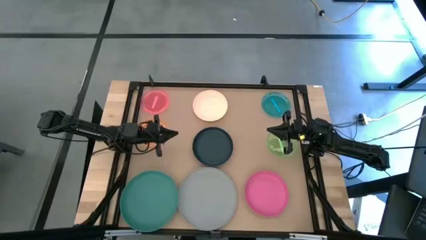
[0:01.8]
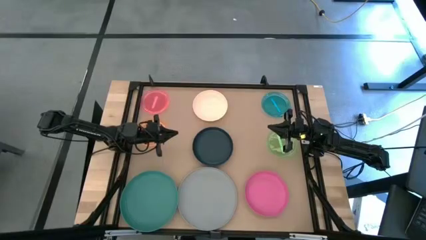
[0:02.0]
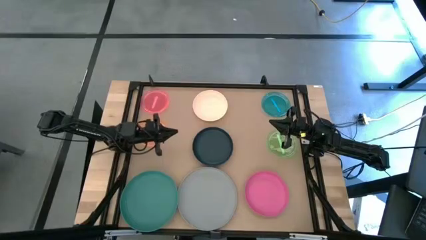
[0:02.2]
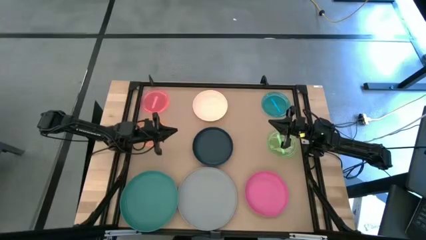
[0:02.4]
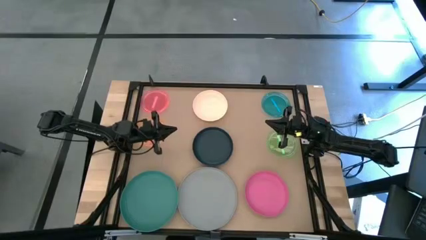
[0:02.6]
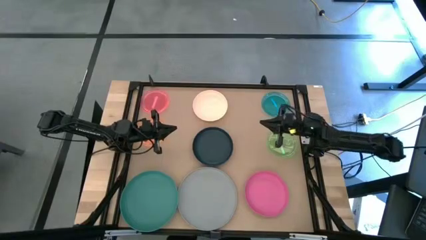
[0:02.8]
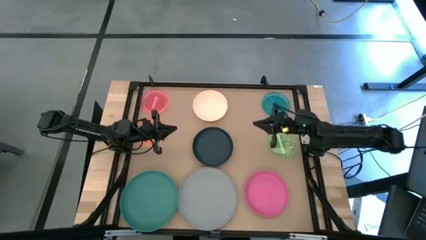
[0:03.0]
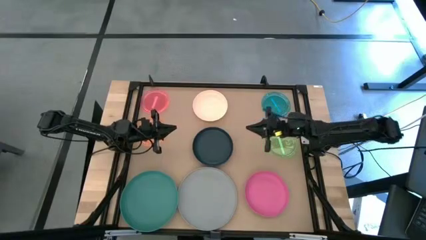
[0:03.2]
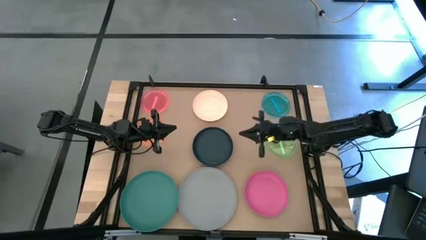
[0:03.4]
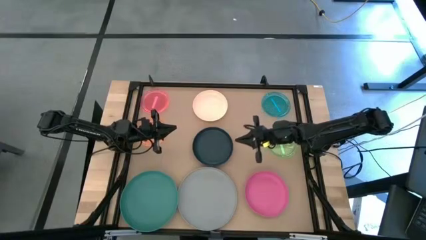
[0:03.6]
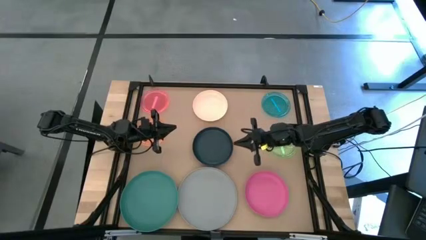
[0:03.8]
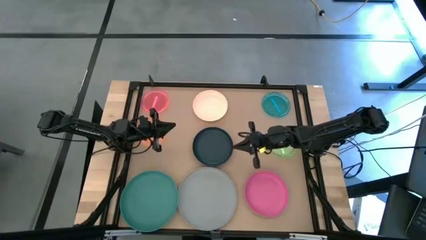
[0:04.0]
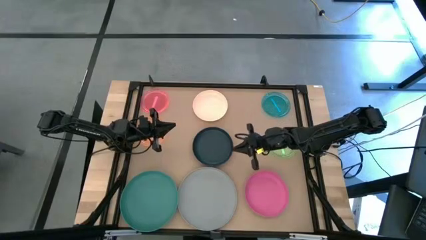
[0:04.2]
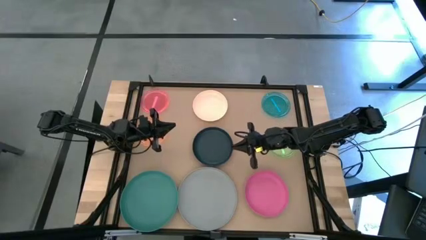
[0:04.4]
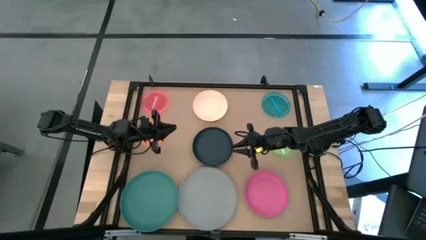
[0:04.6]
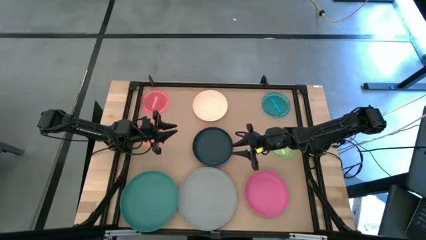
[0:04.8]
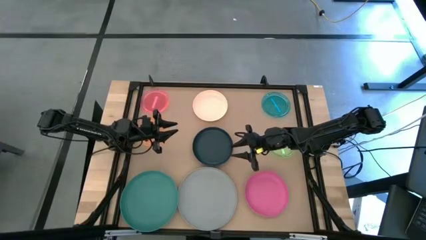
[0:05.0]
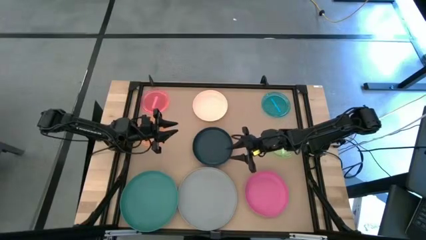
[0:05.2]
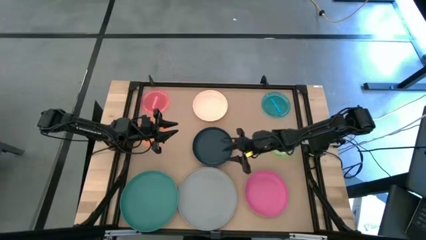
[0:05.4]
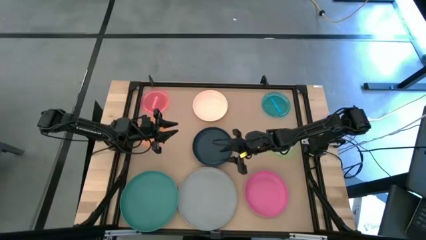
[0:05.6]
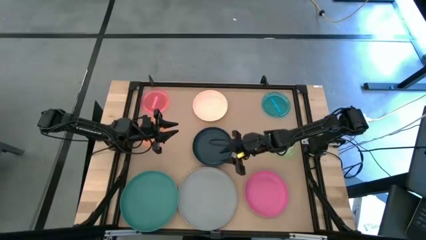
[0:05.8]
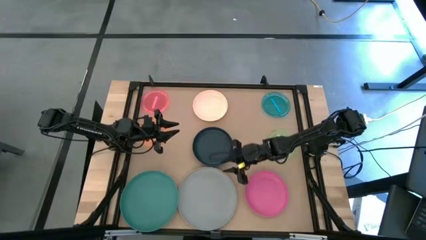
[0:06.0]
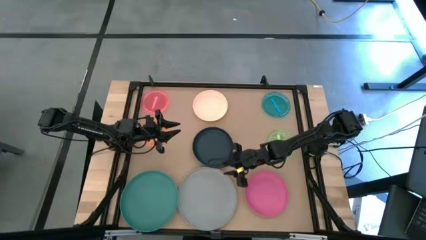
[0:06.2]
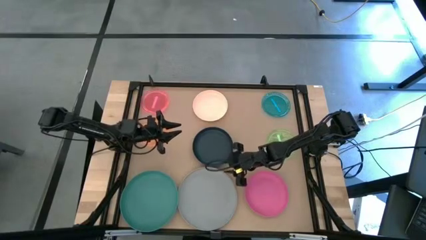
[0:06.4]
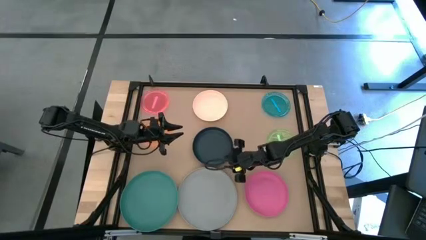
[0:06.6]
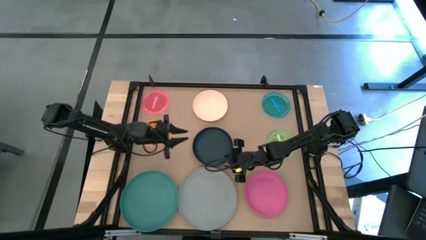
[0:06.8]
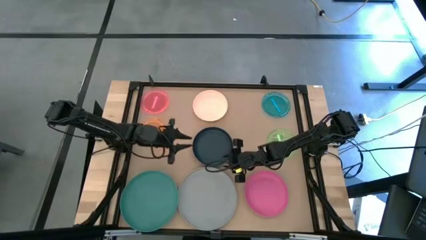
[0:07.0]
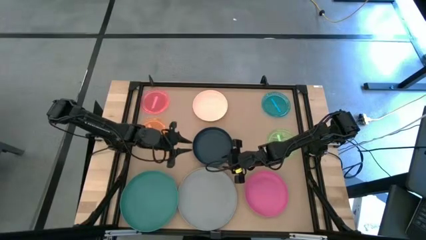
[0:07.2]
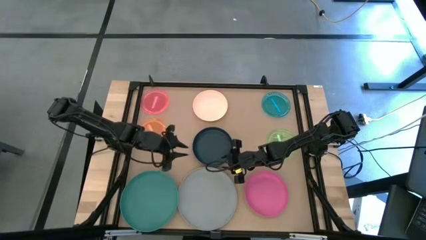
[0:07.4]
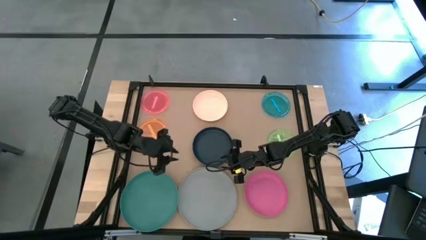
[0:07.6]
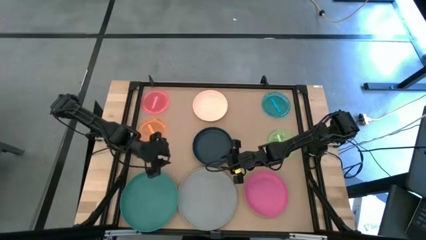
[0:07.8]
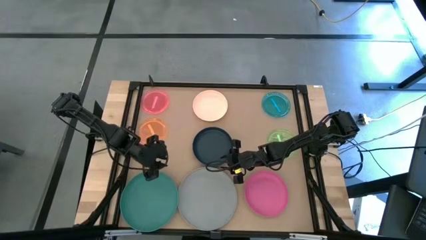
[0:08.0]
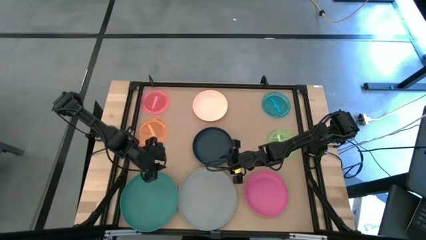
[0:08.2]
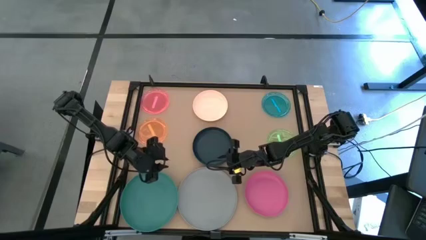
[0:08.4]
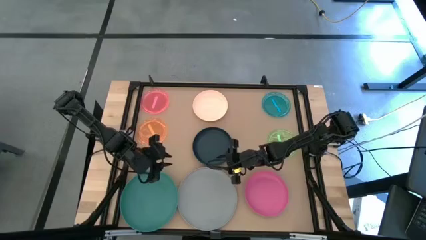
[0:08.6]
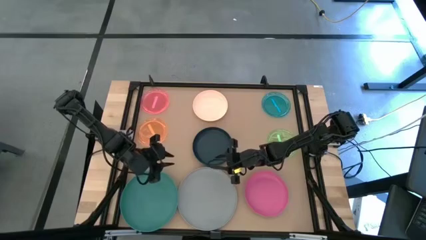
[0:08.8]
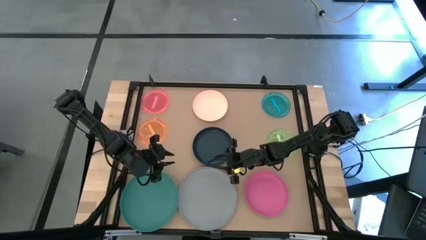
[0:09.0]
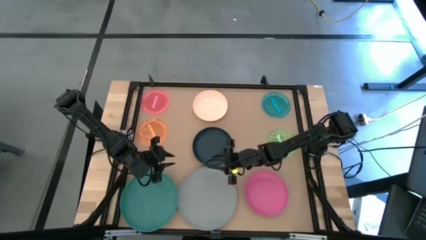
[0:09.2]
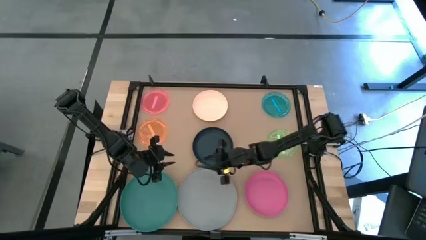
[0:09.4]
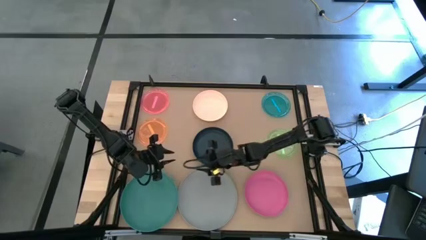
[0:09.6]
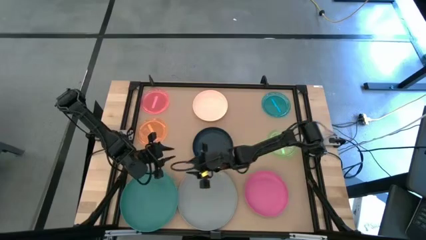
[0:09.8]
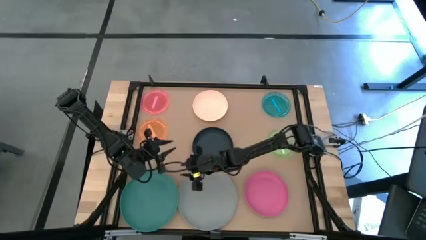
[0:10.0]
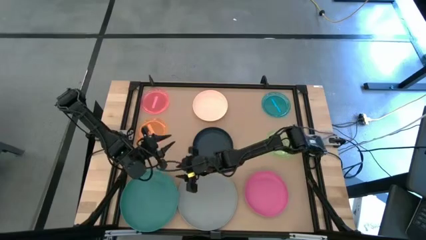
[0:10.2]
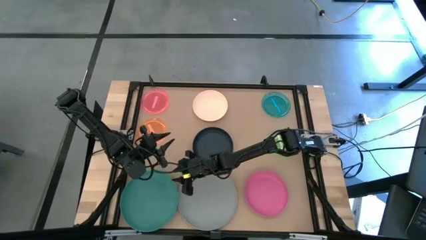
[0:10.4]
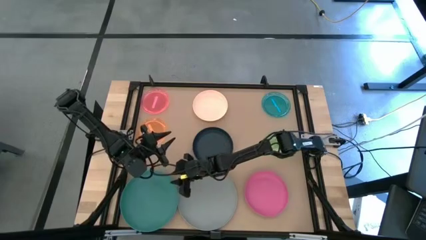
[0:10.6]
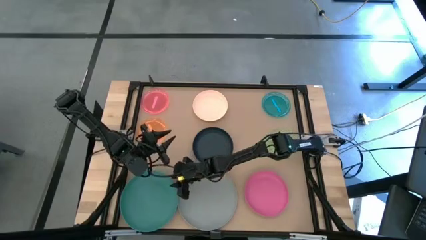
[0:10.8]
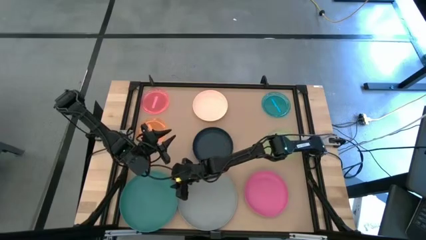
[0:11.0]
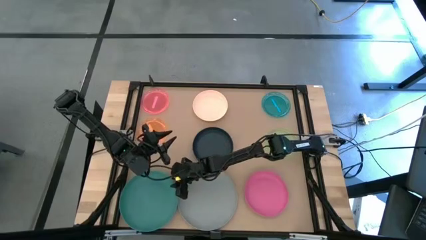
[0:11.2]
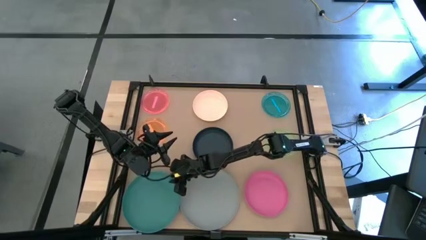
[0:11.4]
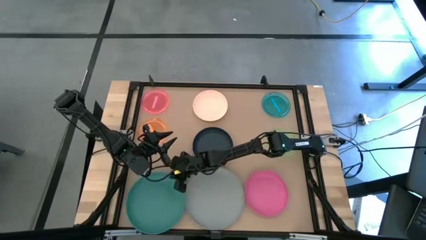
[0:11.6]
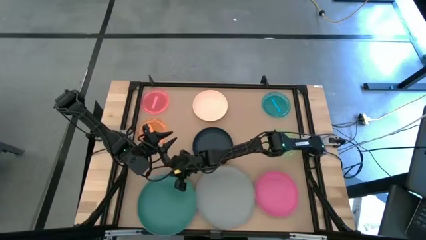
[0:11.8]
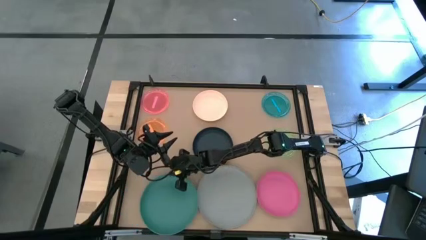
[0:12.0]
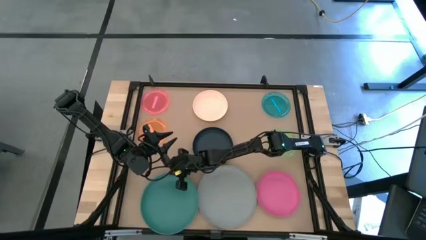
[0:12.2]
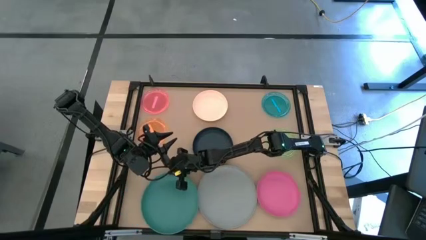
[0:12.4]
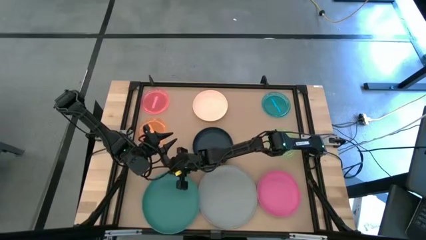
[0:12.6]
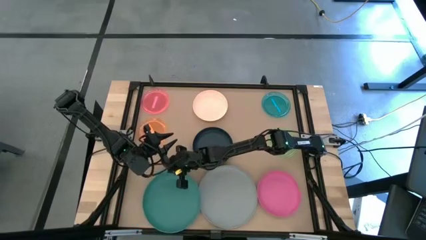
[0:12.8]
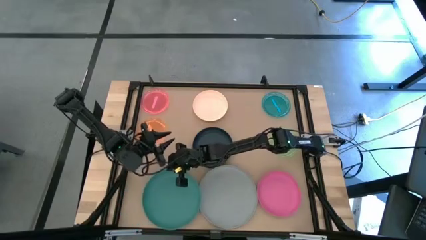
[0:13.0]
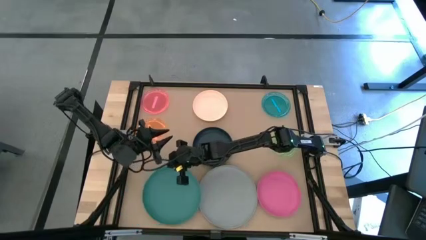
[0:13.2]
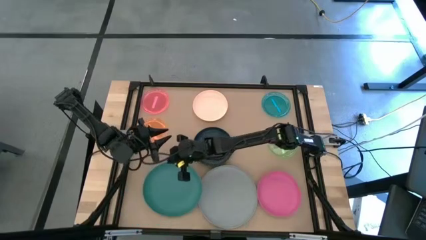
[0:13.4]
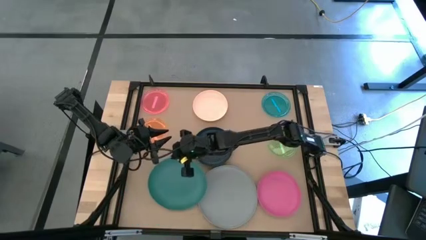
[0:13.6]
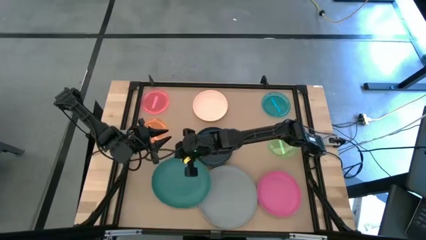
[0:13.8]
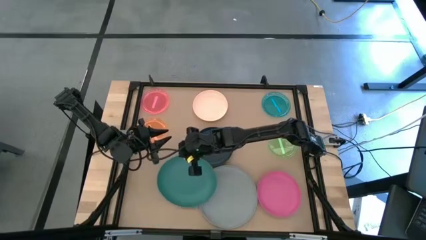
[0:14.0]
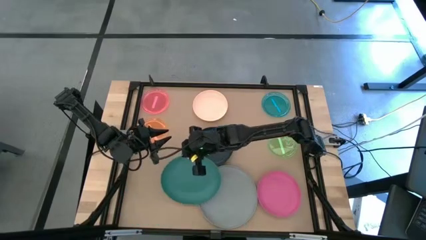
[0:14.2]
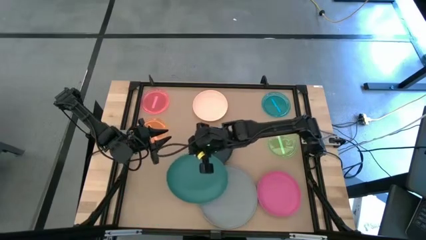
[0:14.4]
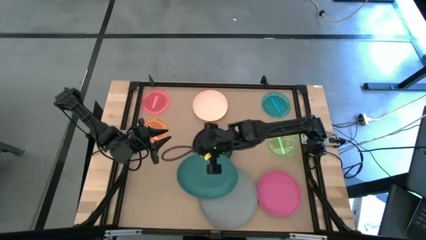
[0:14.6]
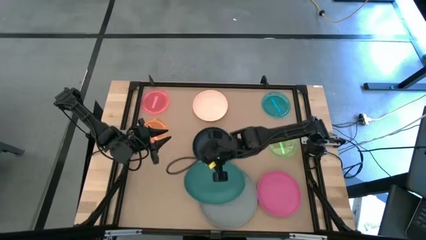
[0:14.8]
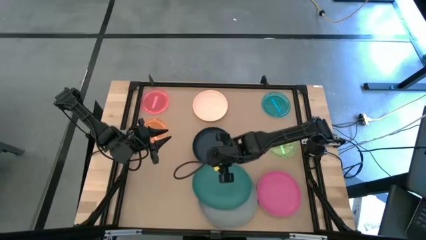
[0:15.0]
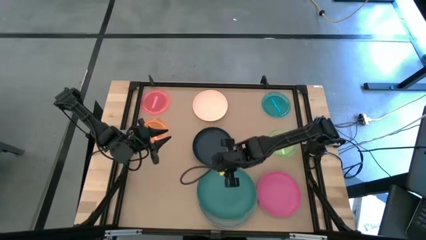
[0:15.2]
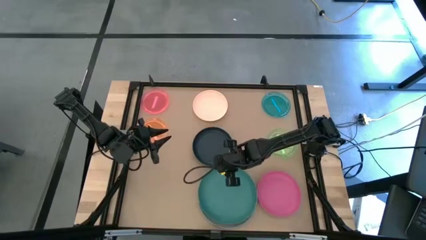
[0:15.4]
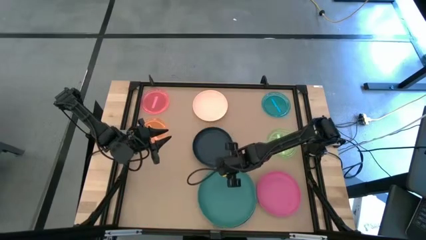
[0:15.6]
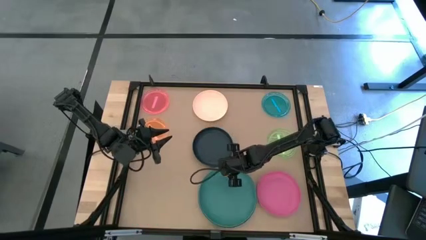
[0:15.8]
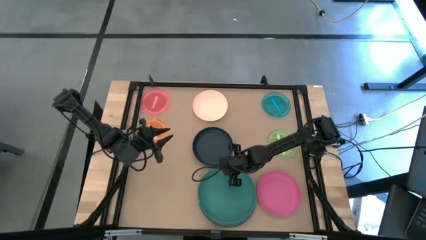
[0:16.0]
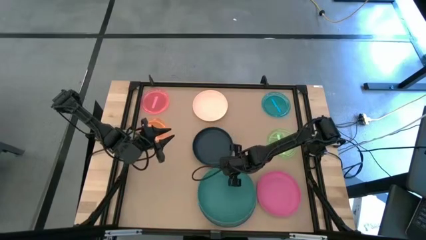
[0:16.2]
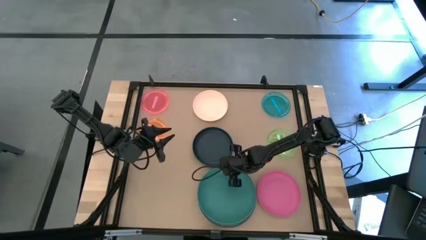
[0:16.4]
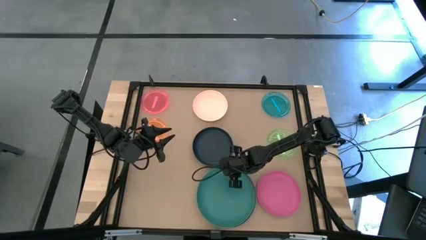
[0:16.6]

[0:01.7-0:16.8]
Task: Stack plastic plates
Stack the large green plate on top of the large grey plate
